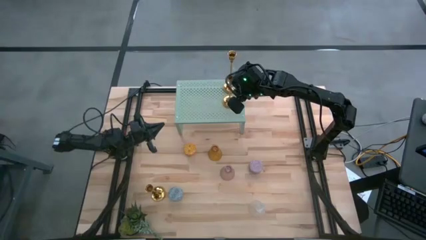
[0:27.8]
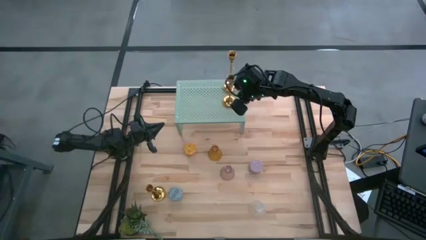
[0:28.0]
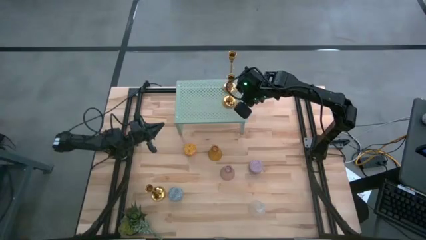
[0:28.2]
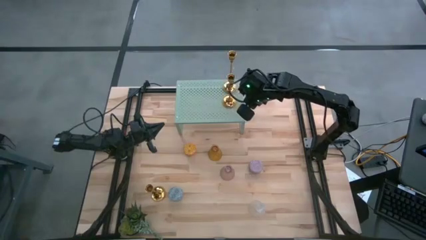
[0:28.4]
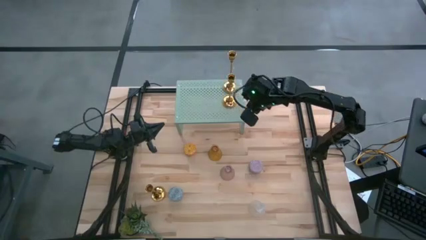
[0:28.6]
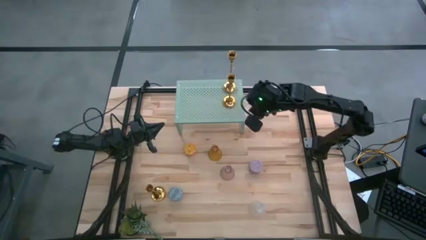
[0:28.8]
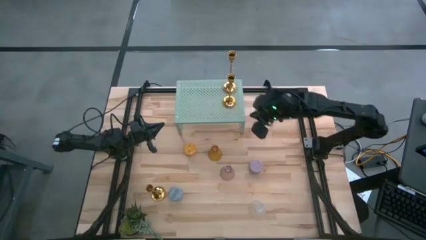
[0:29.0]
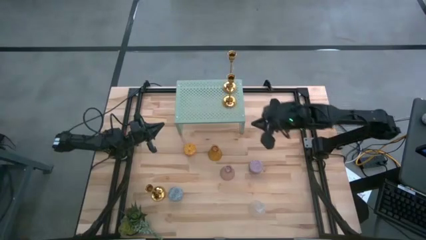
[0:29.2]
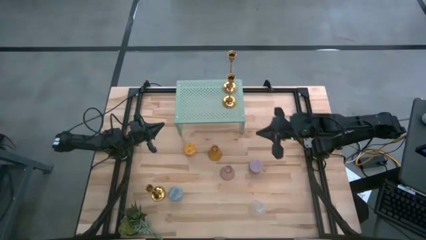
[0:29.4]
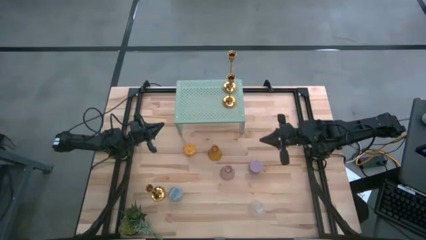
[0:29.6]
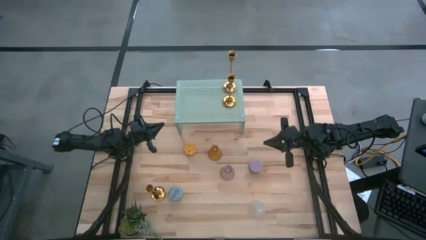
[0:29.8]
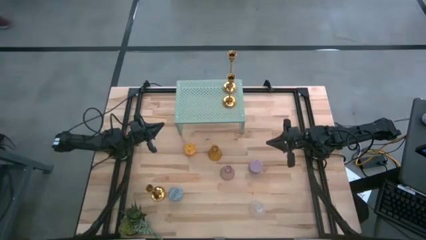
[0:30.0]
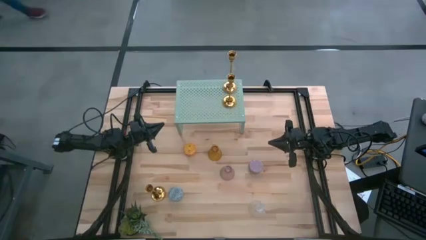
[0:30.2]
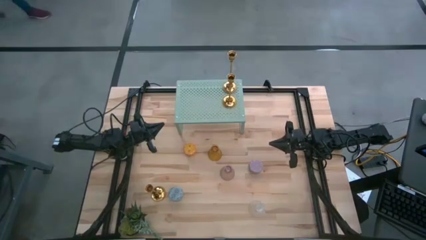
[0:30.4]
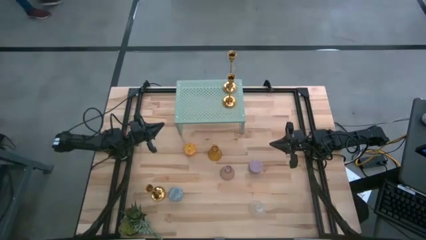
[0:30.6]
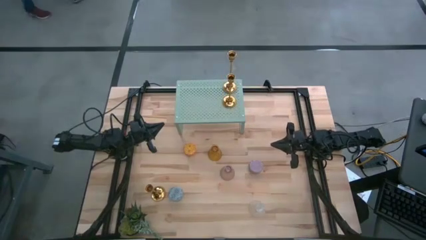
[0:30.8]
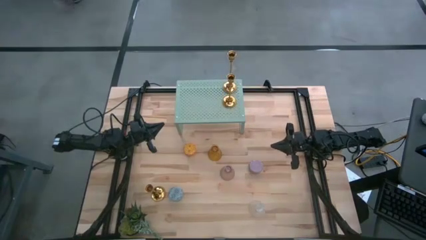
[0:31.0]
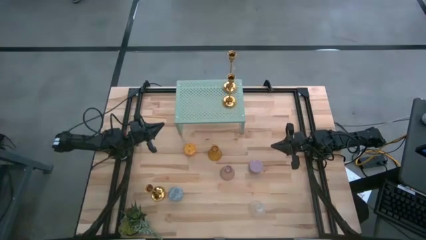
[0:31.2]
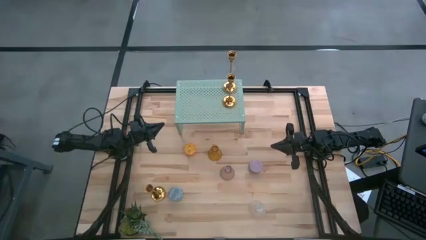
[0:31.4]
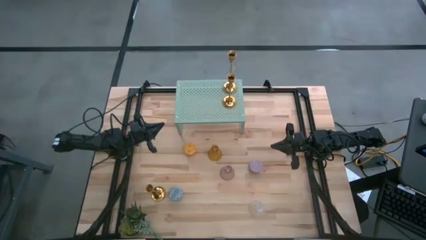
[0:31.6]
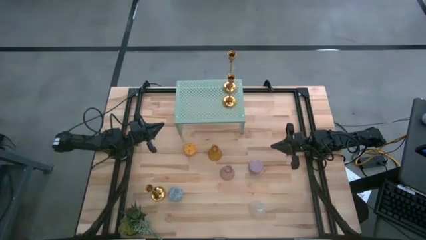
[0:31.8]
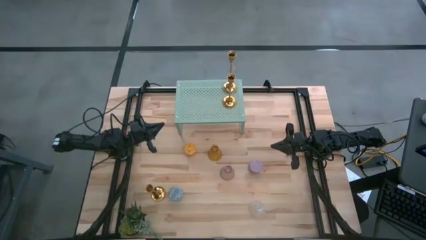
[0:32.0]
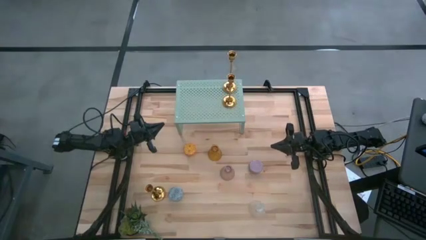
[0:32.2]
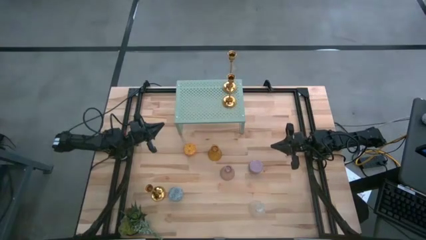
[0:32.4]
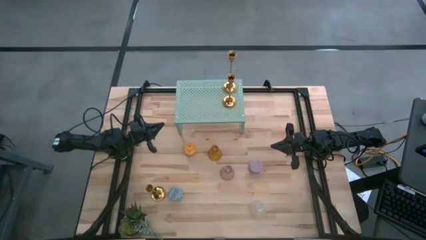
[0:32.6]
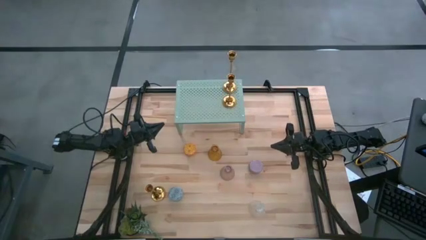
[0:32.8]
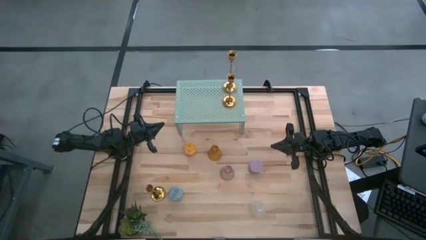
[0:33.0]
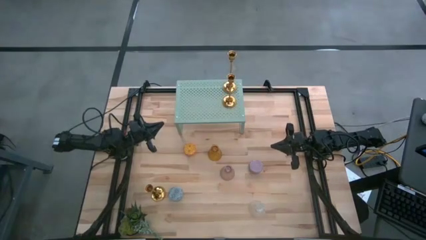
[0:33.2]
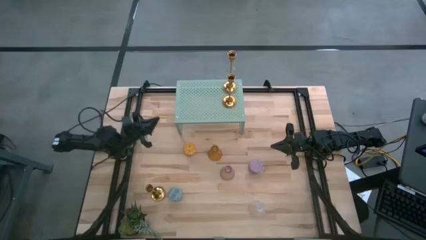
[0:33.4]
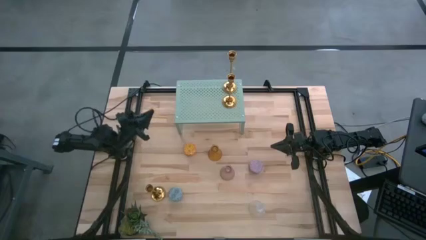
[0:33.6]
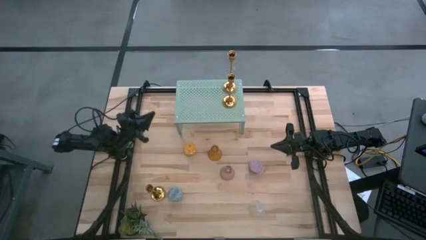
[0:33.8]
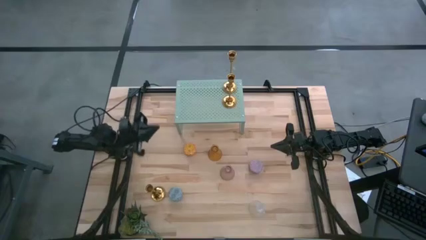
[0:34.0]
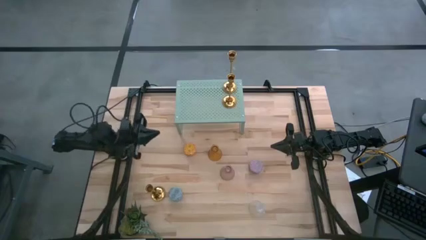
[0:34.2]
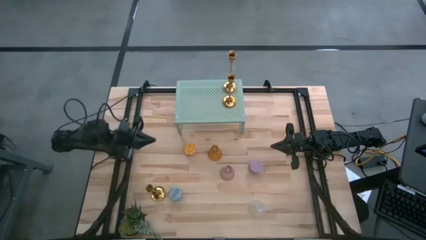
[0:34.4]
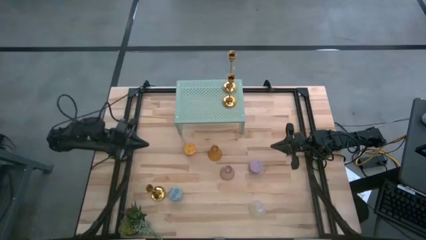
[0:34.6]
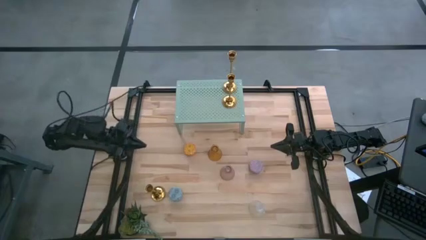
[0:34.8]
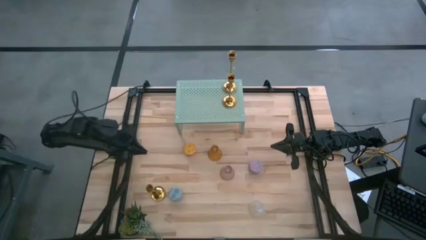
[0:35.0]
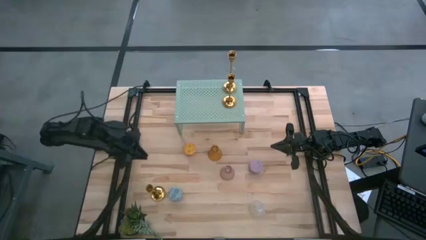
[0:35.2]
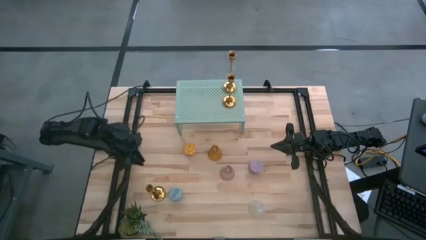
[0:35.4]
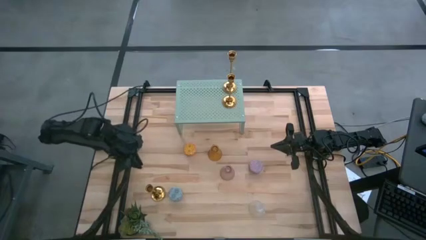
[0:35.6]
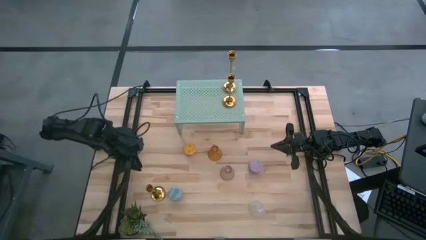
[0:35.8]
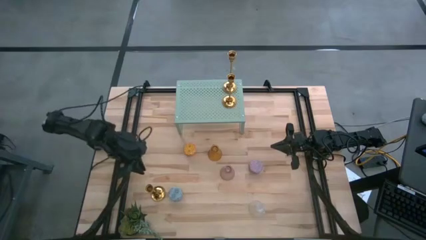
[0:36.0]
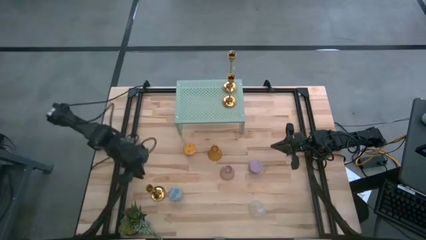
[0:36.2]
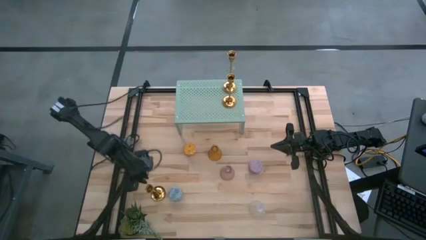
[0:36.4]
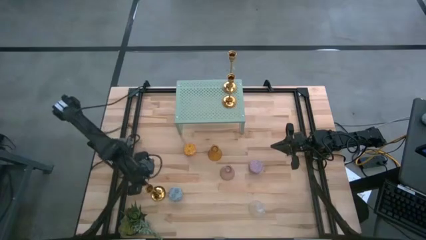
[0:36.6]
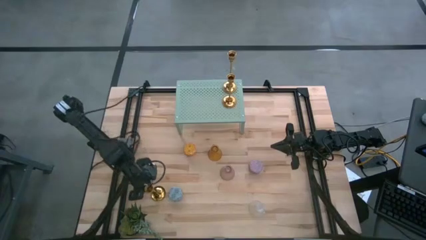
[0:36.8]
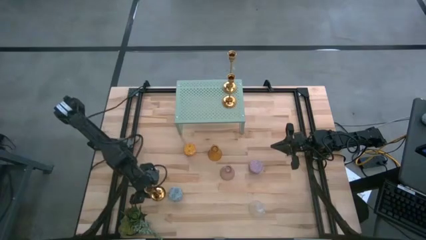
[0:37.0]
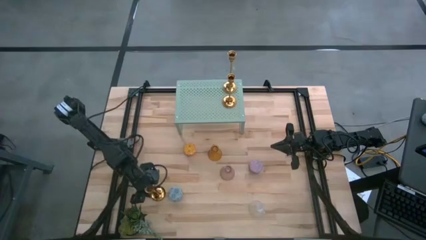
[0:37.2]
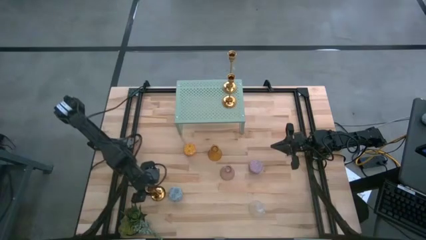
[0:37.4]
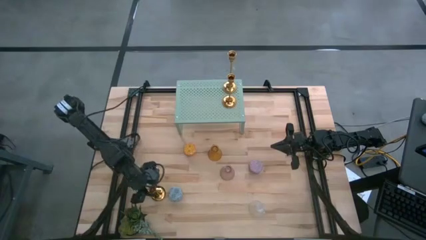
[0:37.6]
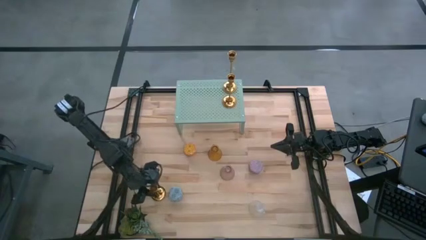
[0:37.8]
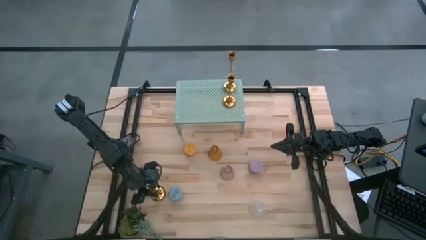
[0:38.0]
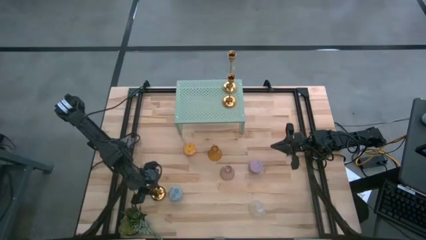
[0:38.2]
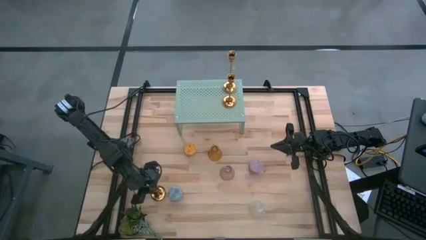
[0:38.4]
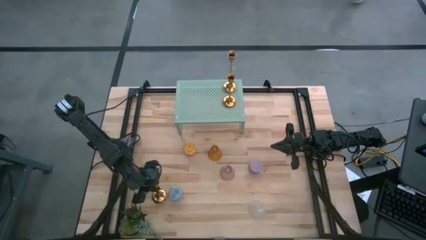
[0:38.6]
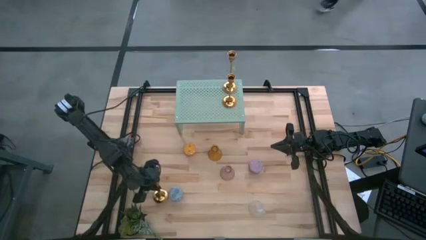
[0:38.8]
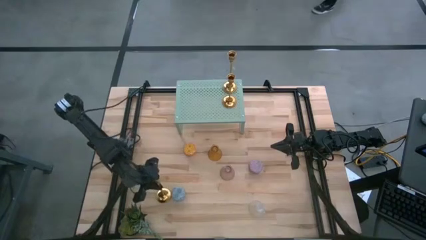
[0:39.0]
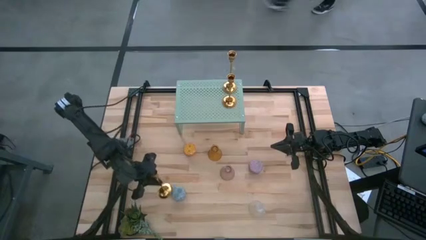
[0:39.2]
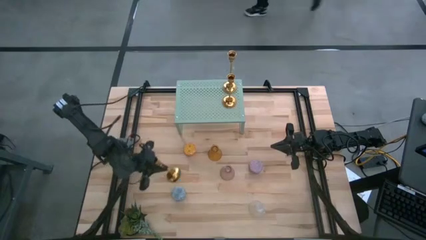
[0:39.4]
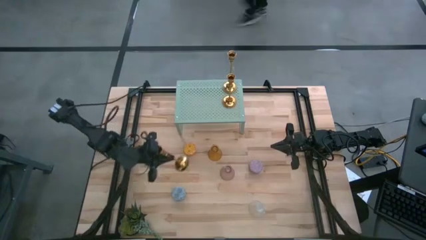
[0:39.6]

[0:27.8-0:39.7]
Task: Pick & Place candle stick holders
Put the gold candle holder on the shelf aligned with the other gold candle holders
